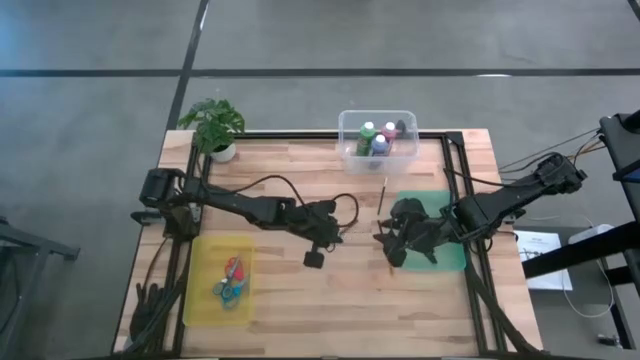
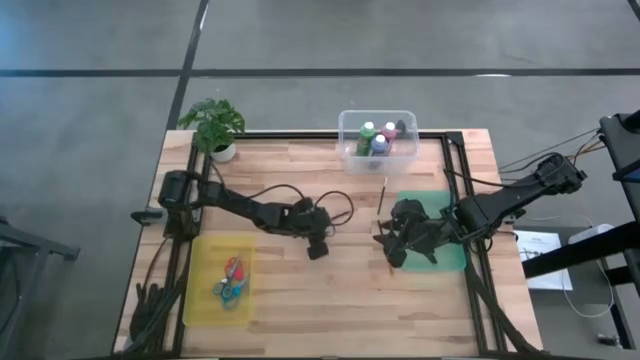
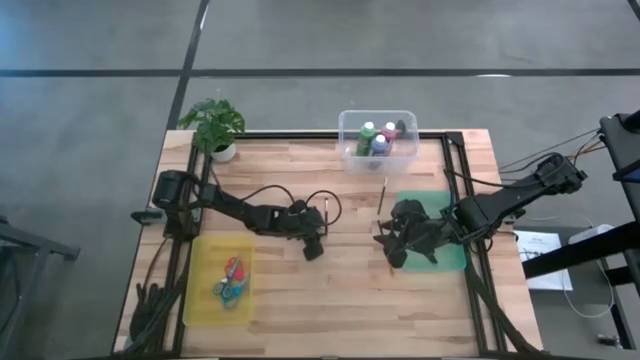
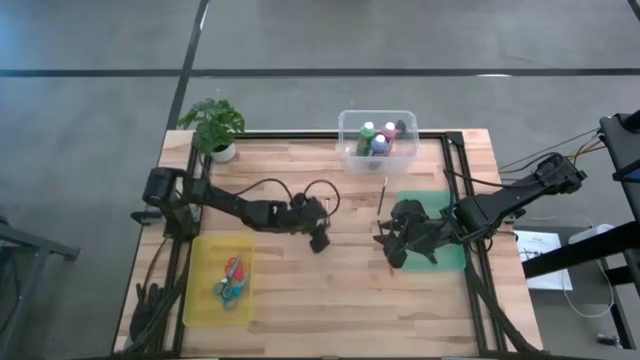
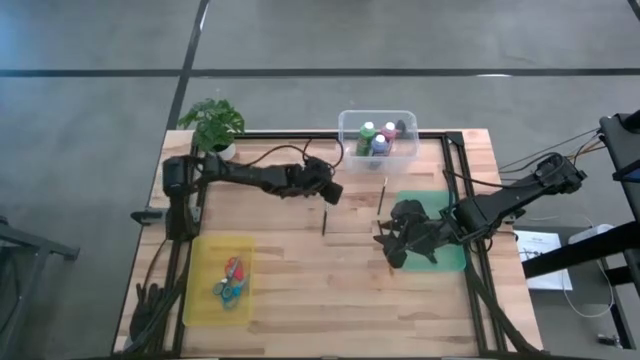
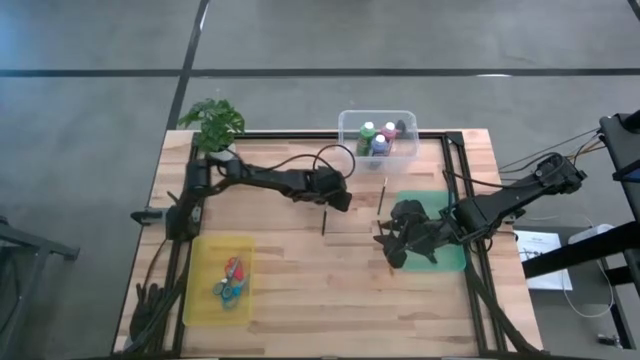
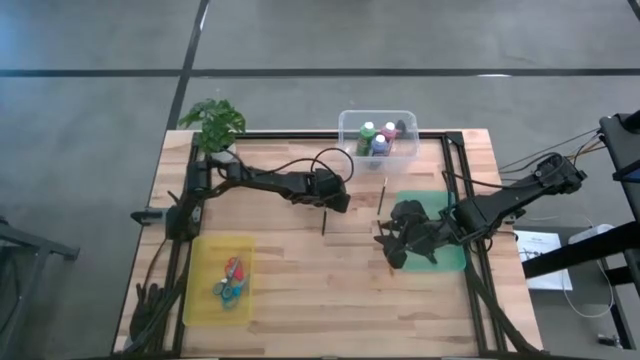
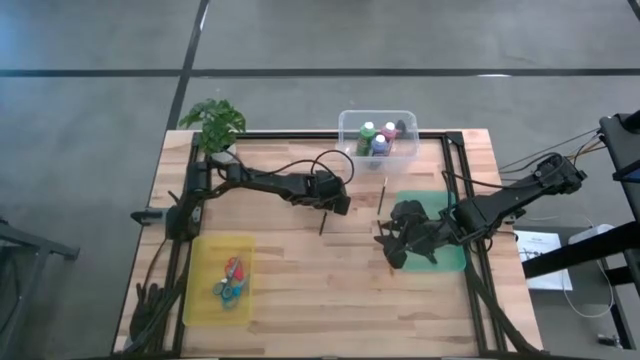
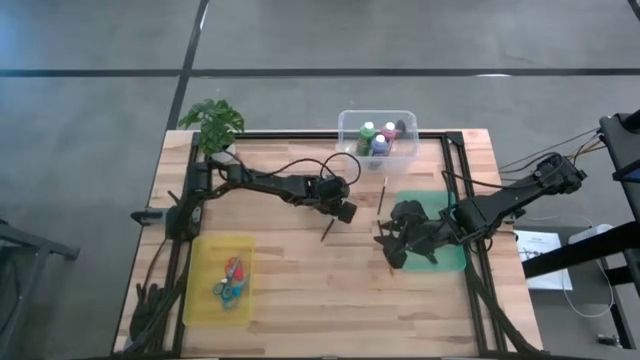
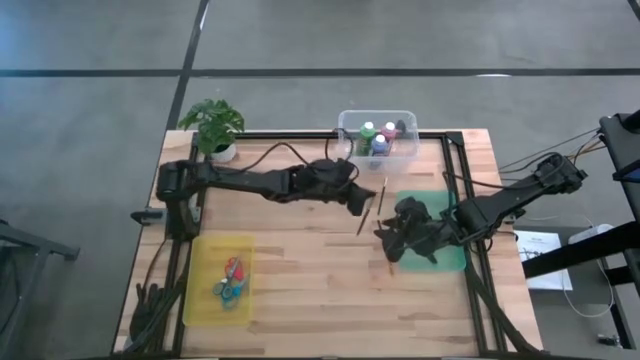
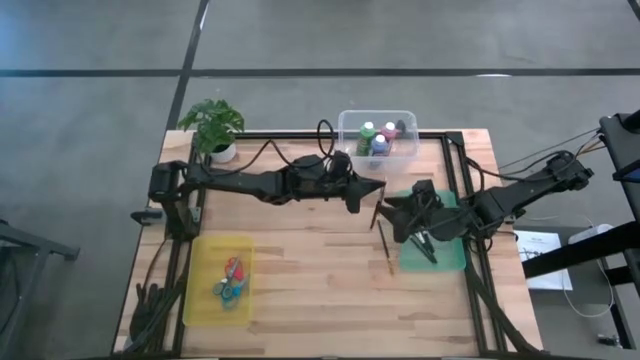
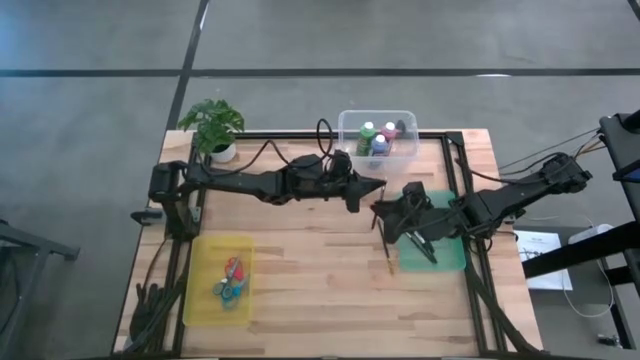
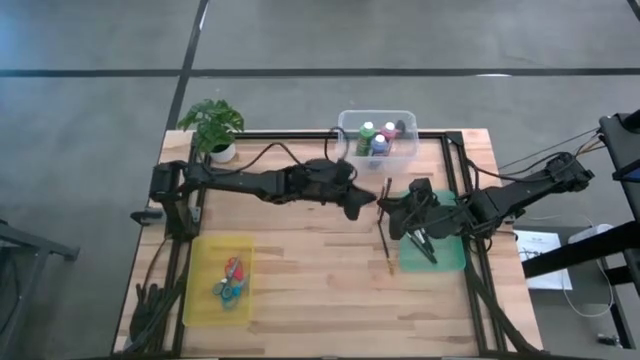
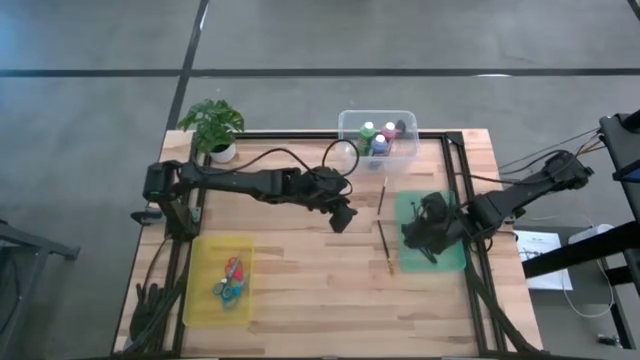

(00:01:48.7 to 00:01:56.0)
Task: Pick & Place Paint Supplies
Put the black foundation brush into the green bin

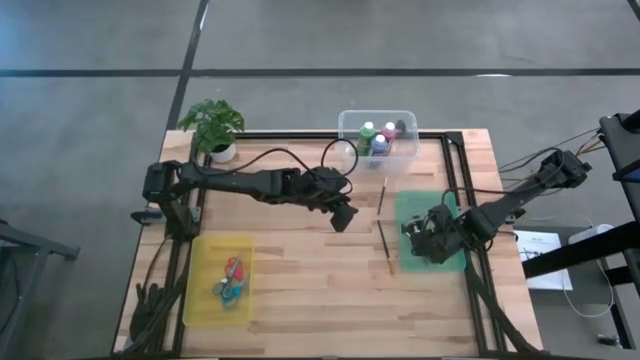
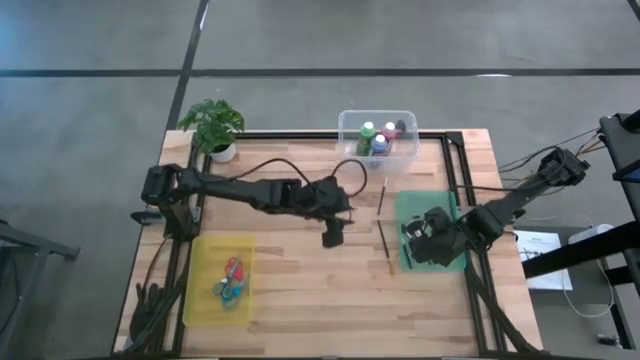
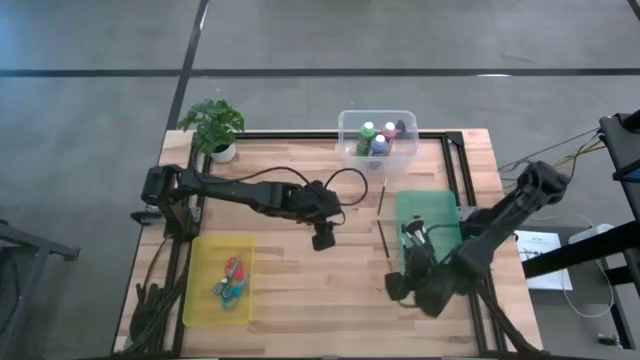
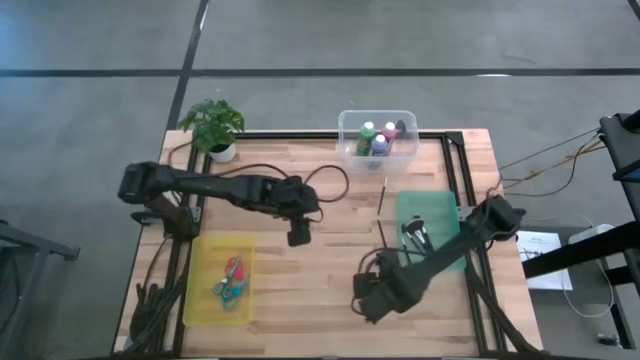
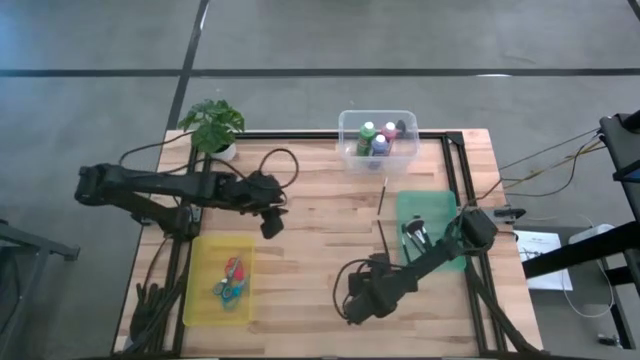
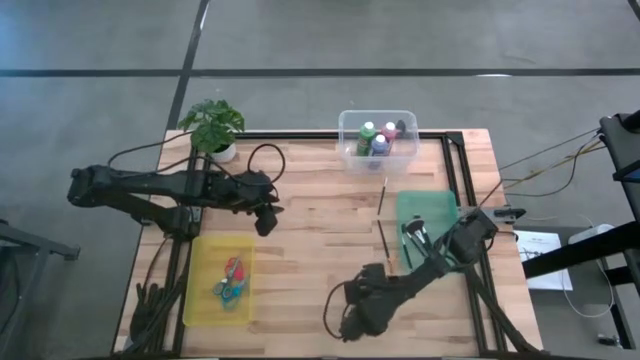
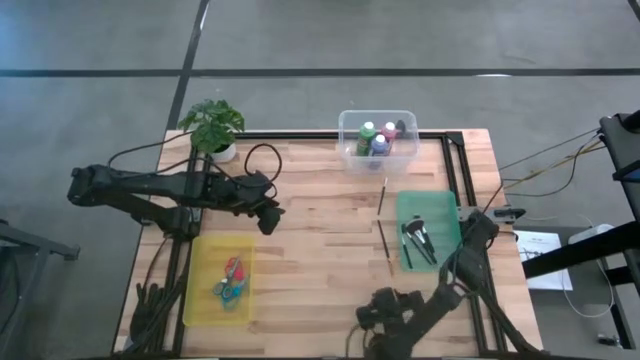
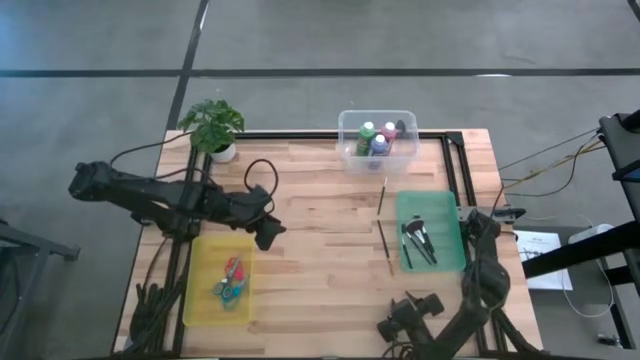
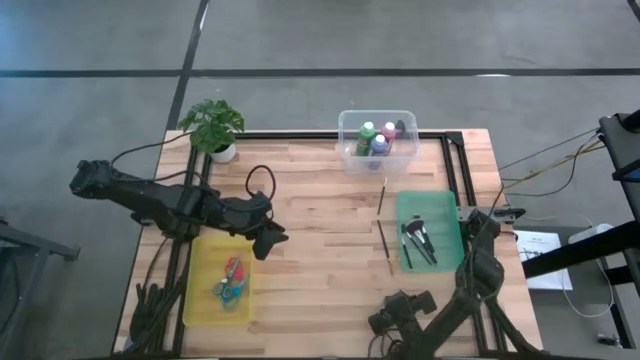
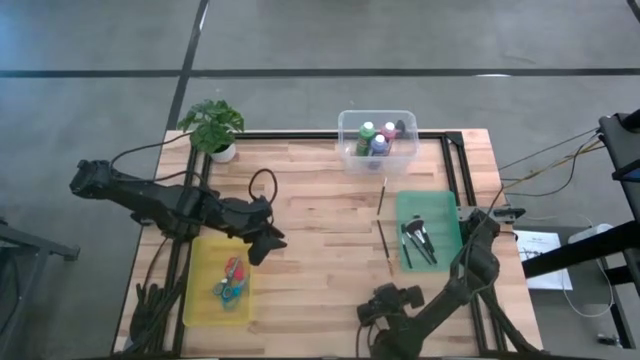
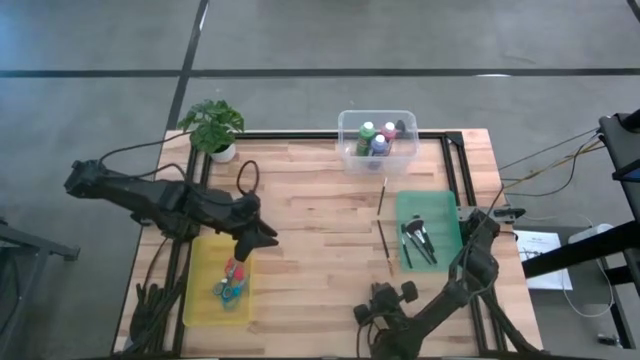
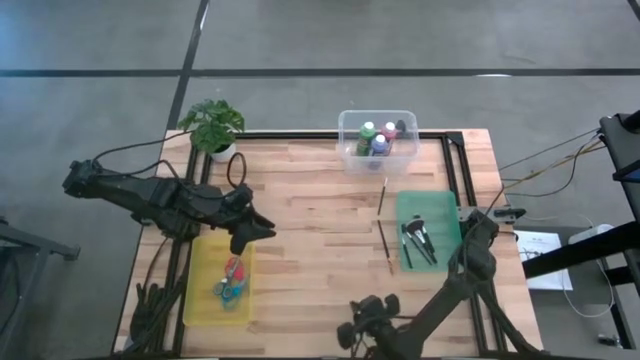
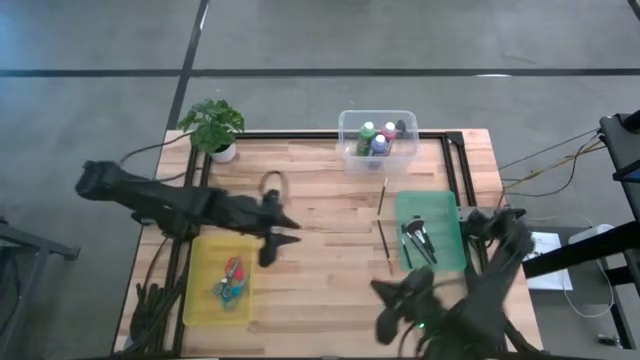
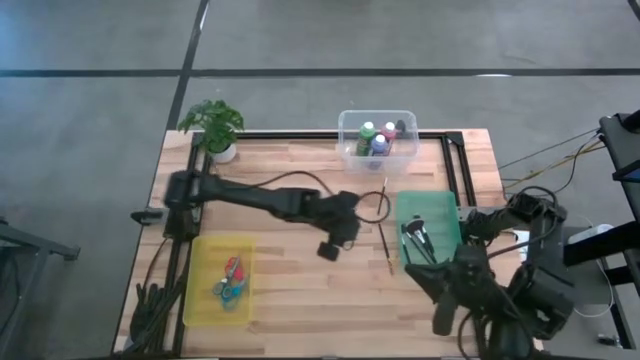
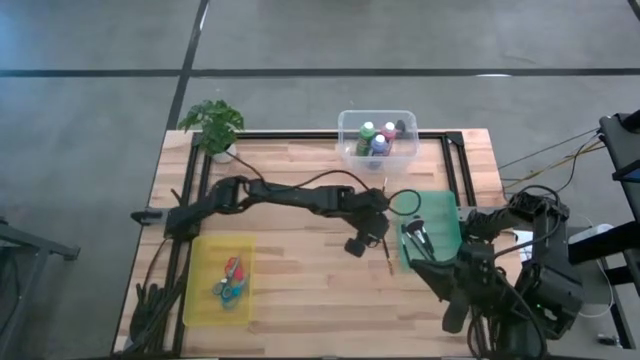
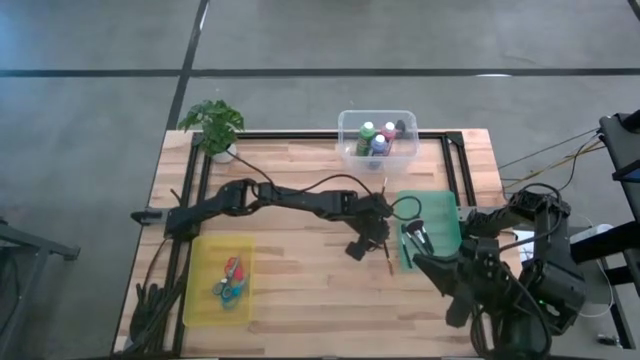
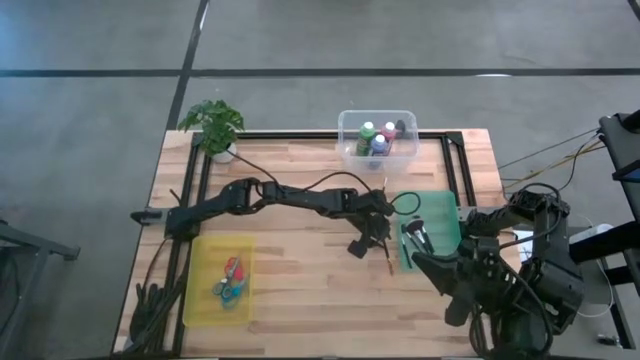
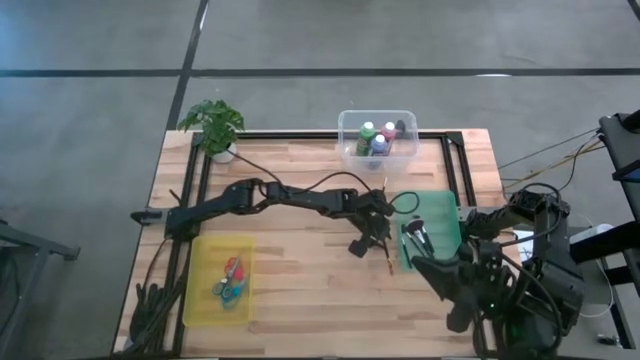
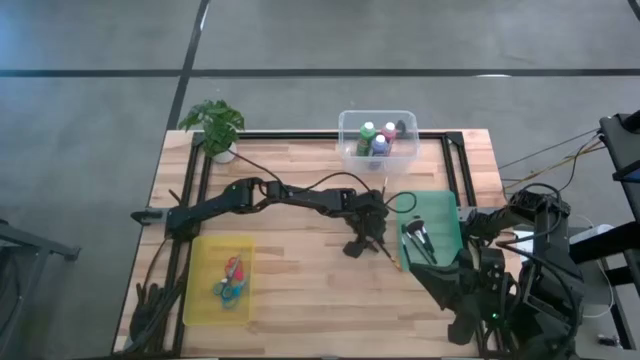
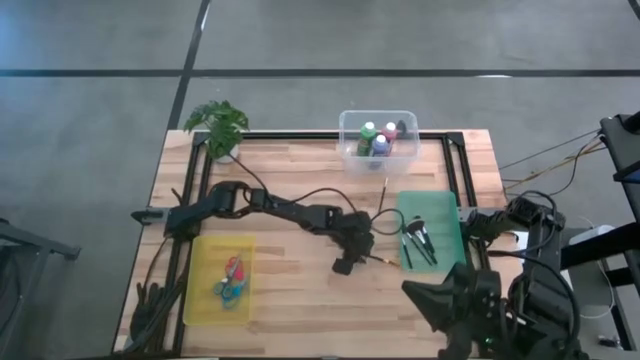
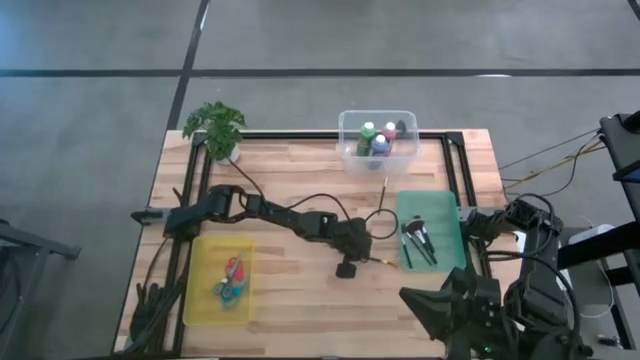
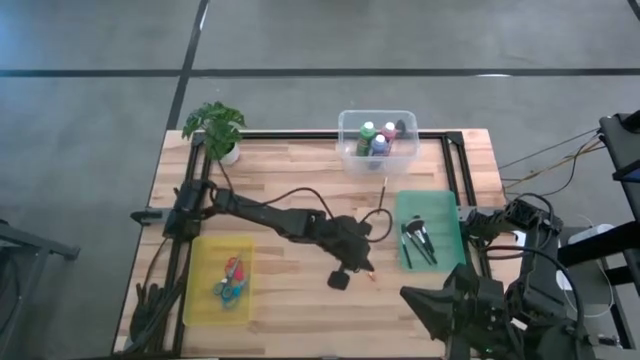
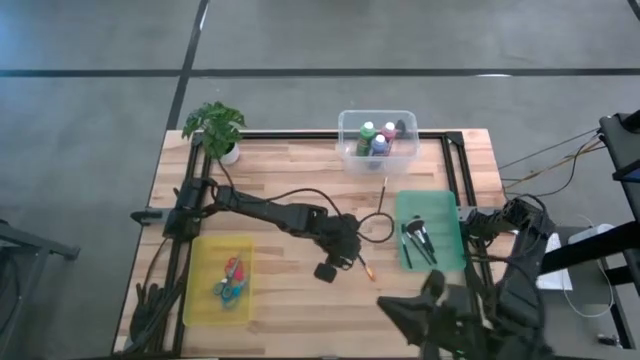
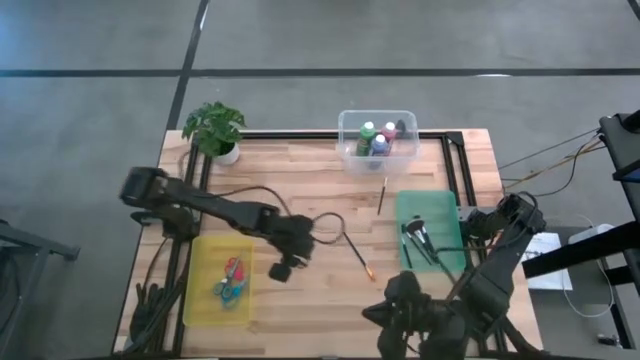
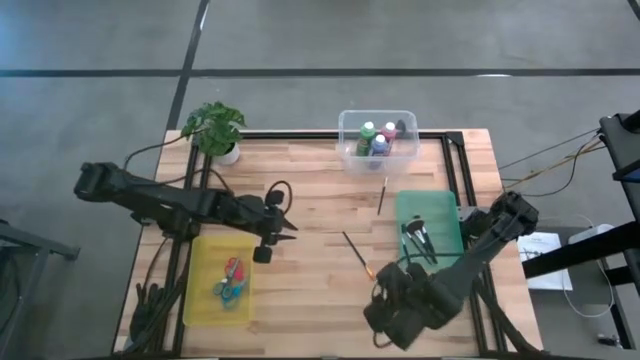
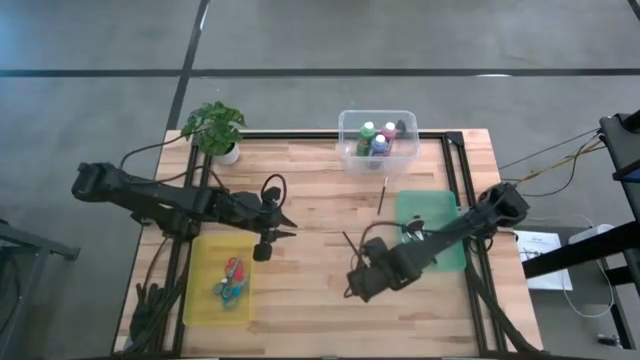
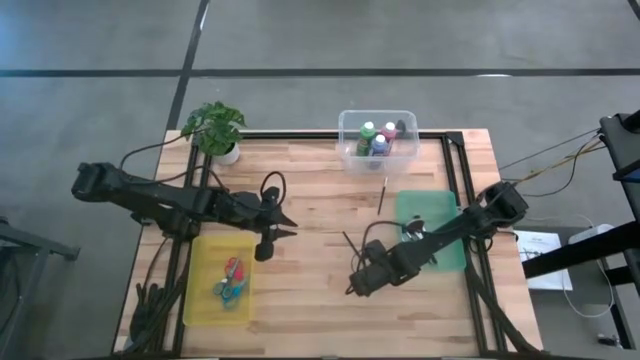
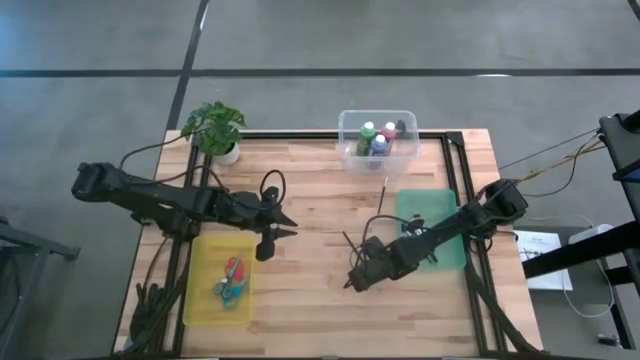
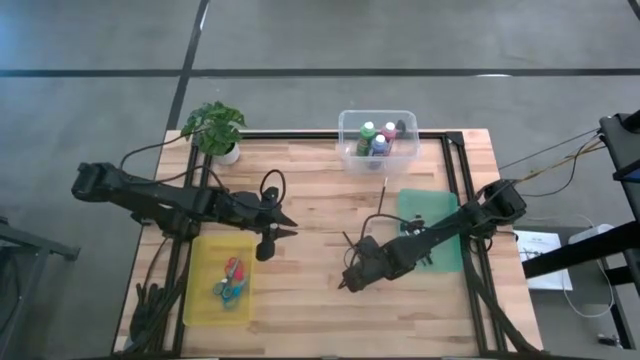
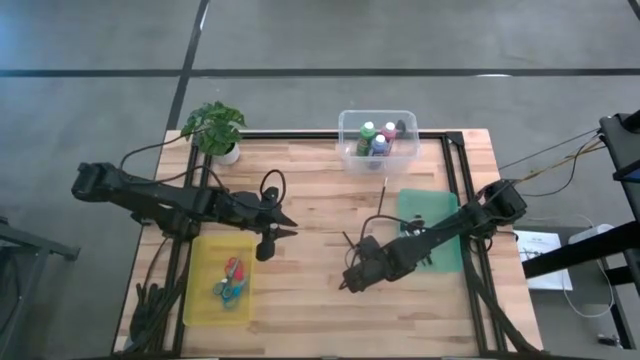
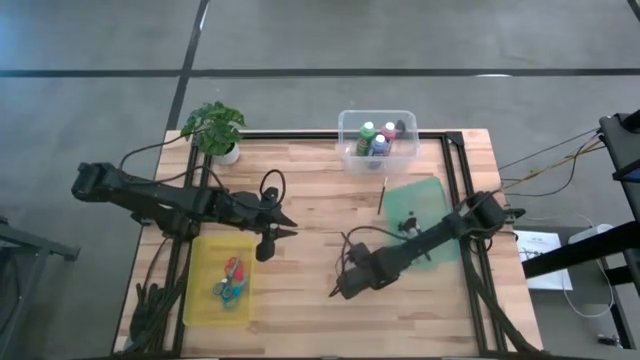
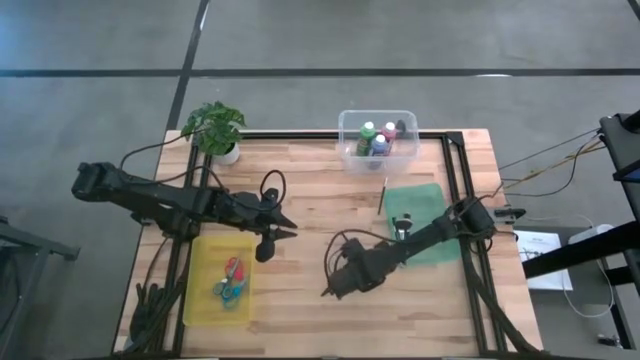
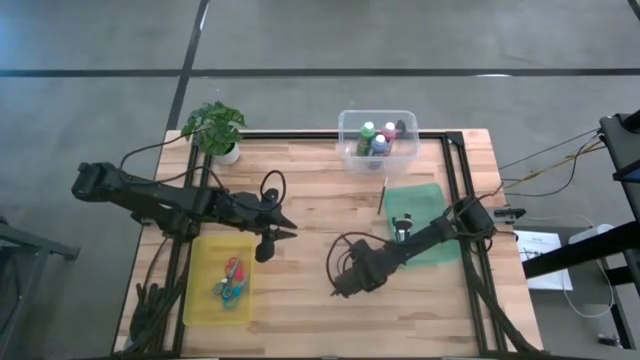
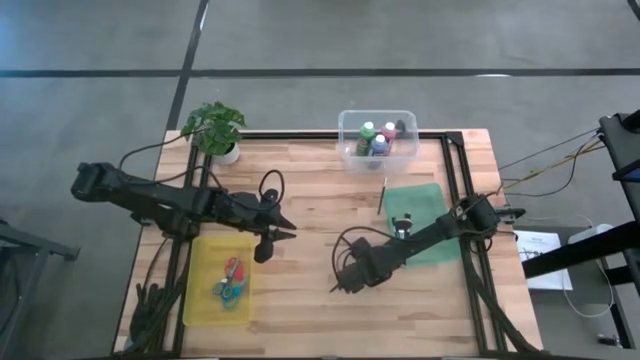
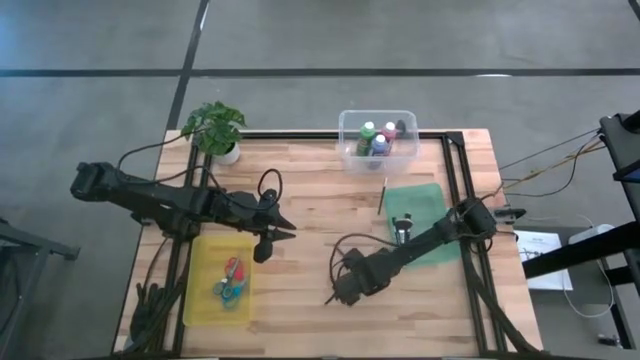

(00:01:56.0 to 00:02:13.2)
Put the black paint brush into the green bin
